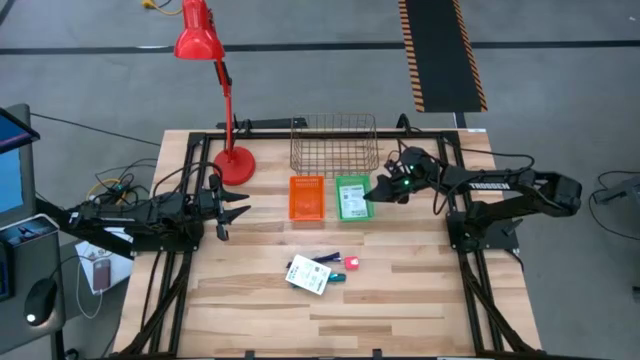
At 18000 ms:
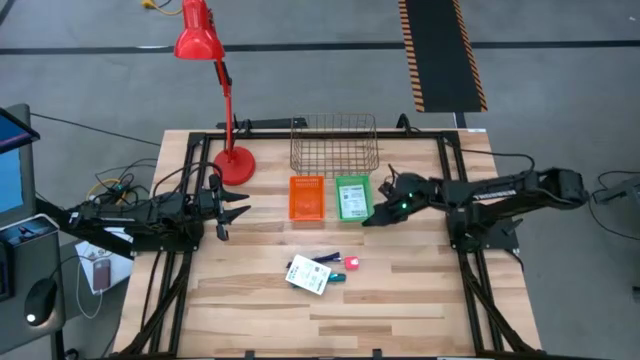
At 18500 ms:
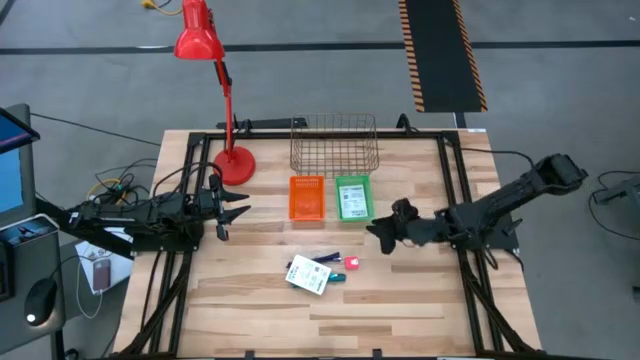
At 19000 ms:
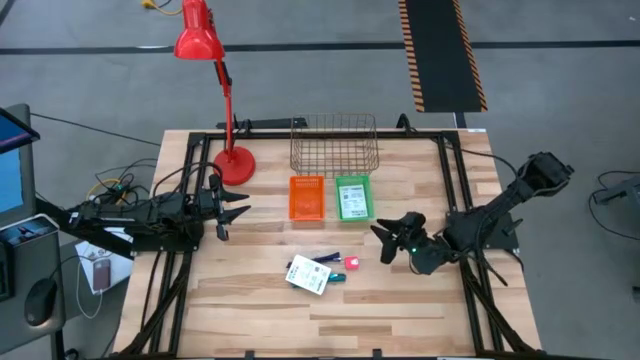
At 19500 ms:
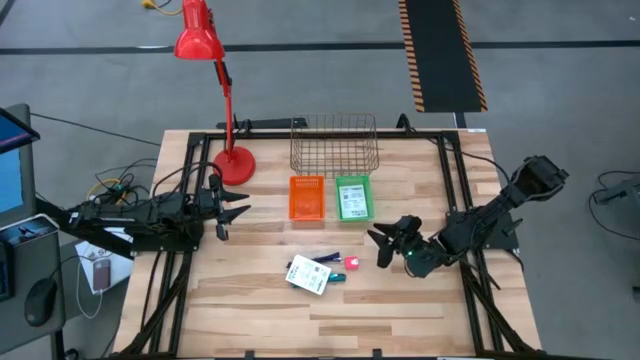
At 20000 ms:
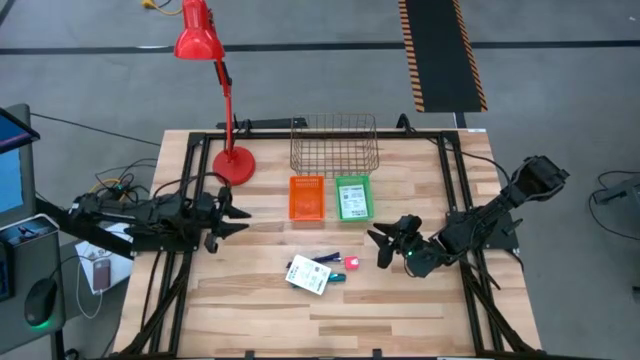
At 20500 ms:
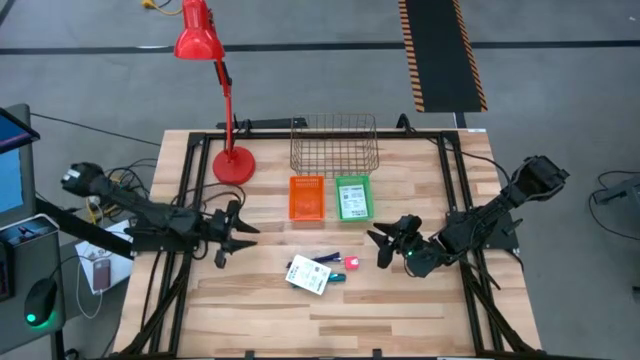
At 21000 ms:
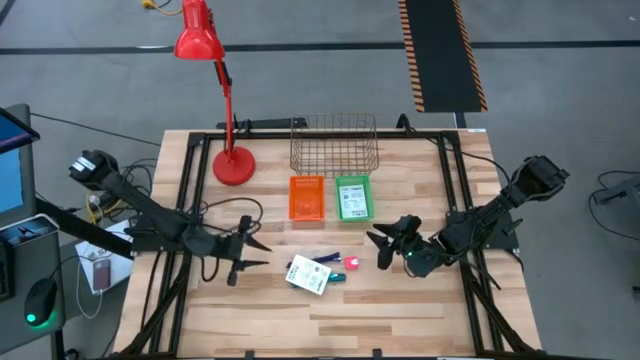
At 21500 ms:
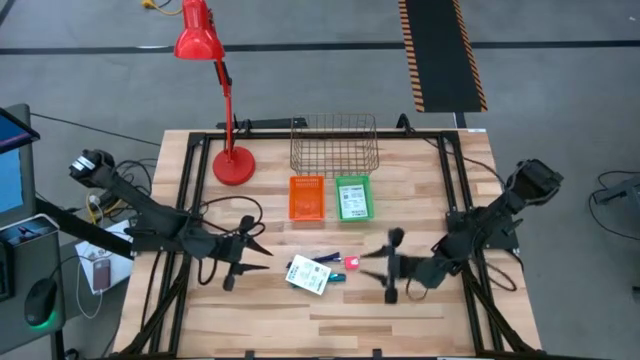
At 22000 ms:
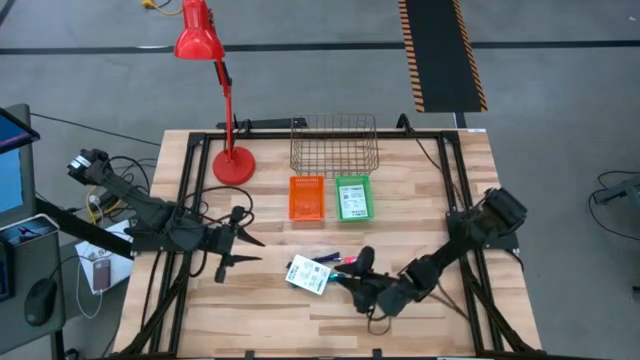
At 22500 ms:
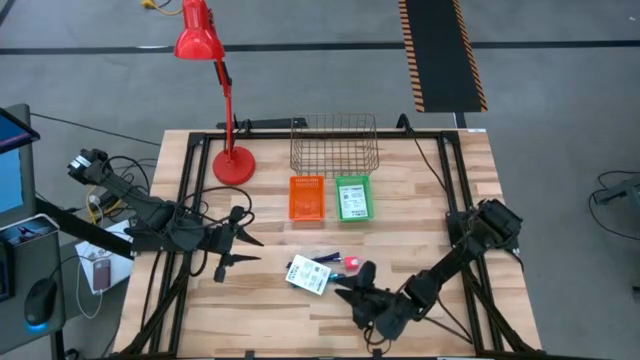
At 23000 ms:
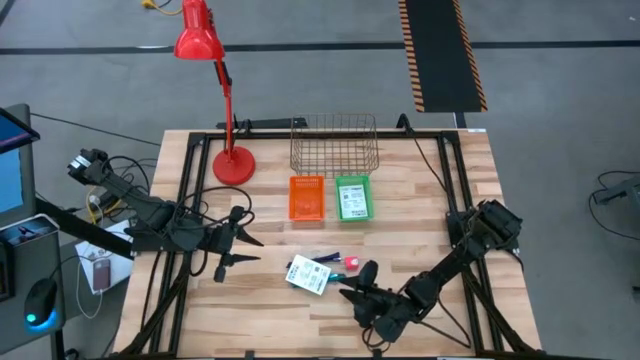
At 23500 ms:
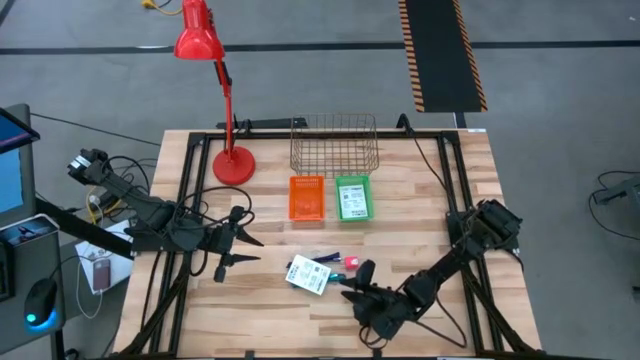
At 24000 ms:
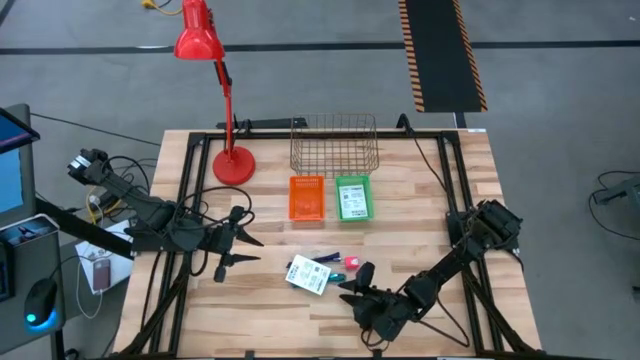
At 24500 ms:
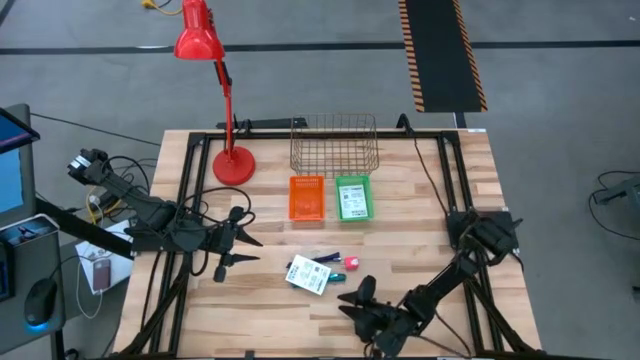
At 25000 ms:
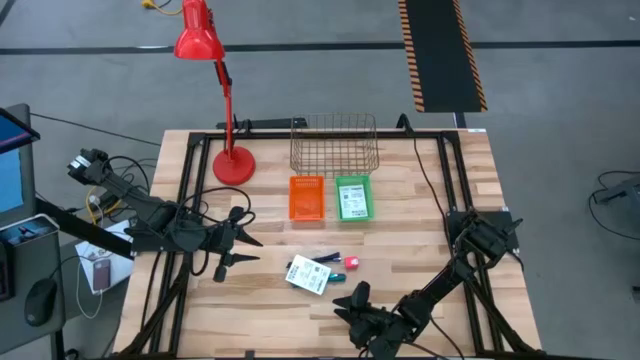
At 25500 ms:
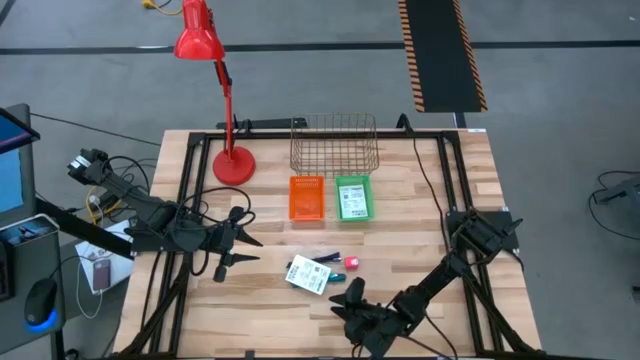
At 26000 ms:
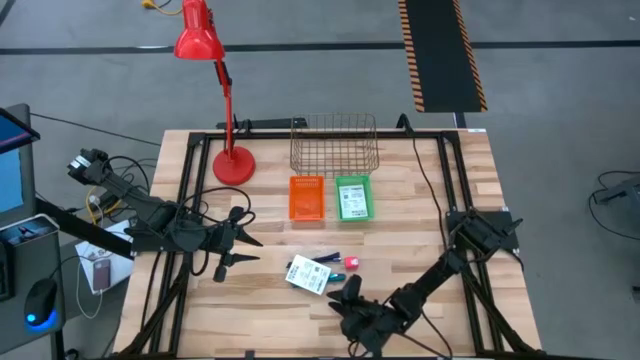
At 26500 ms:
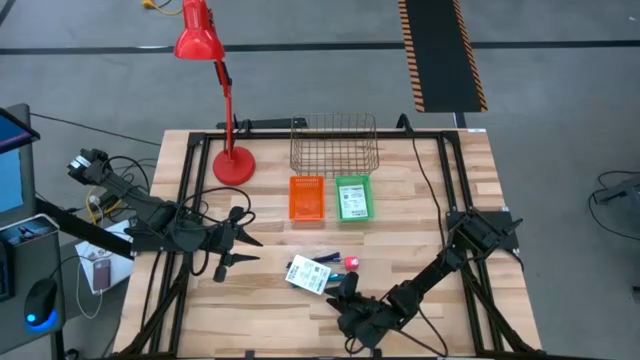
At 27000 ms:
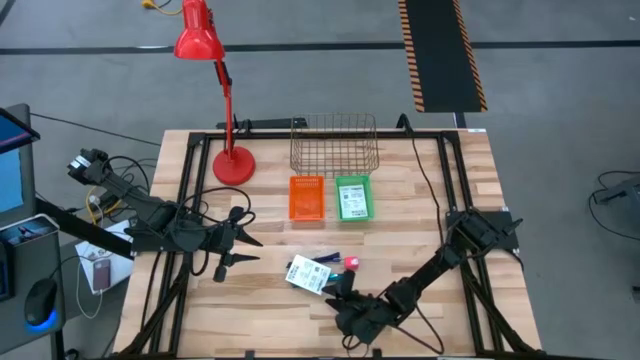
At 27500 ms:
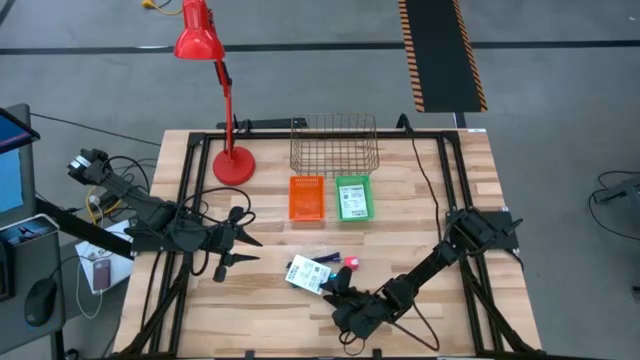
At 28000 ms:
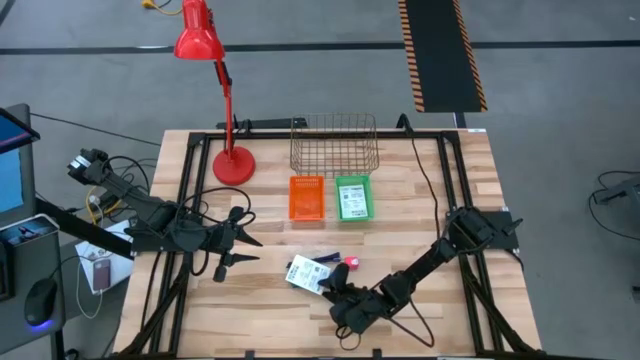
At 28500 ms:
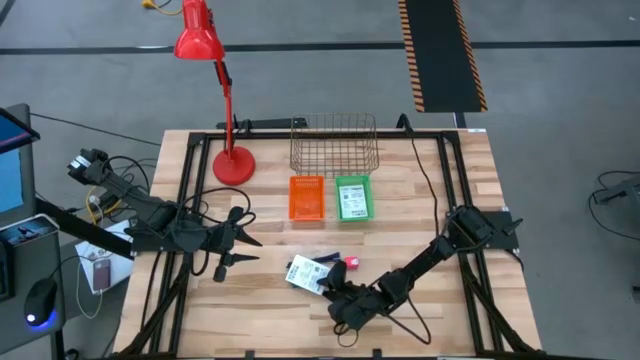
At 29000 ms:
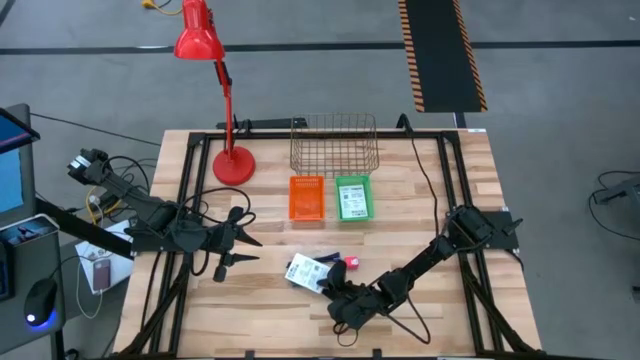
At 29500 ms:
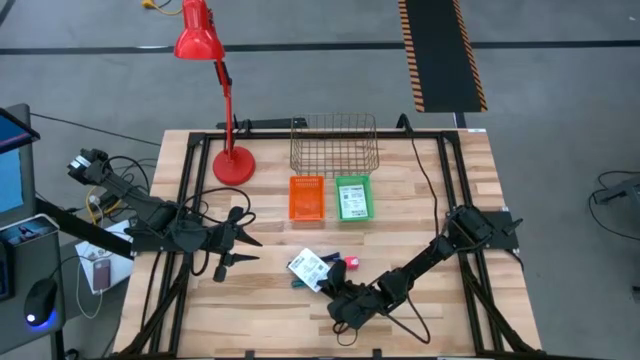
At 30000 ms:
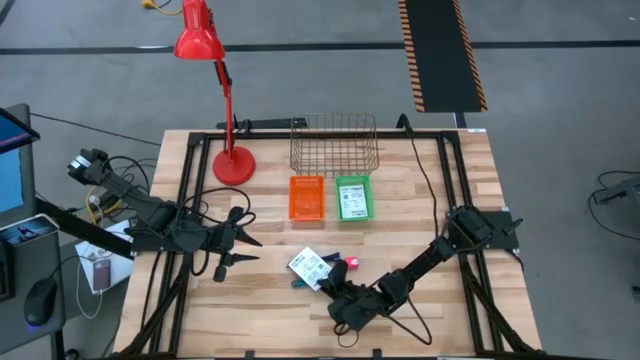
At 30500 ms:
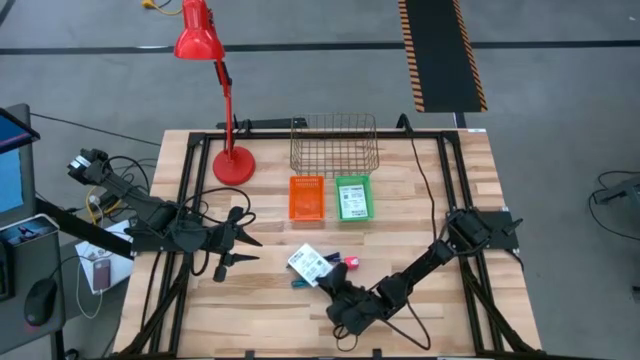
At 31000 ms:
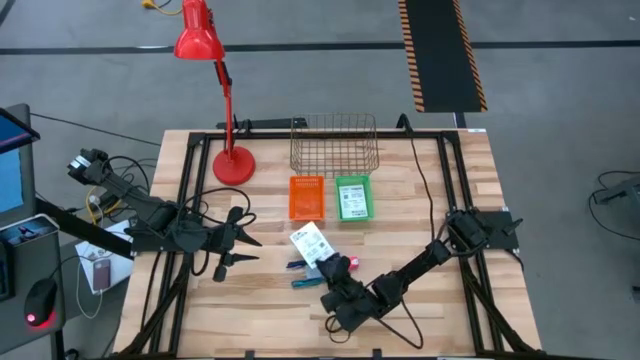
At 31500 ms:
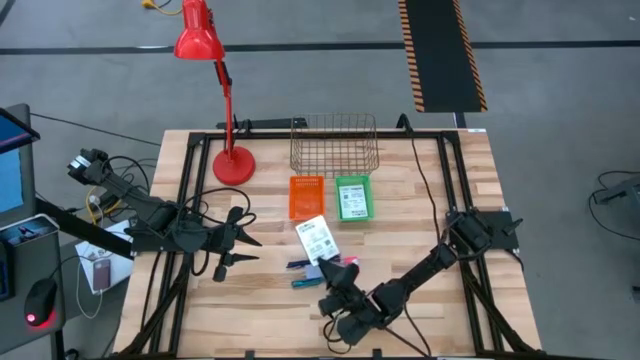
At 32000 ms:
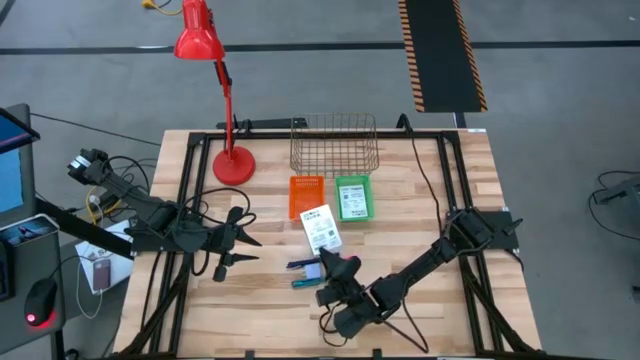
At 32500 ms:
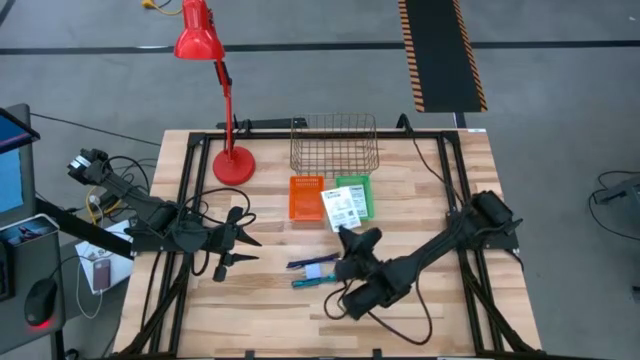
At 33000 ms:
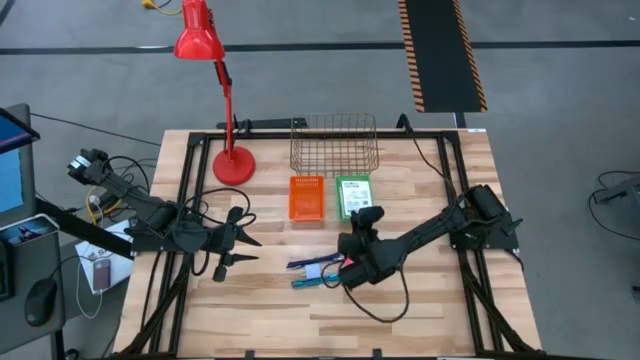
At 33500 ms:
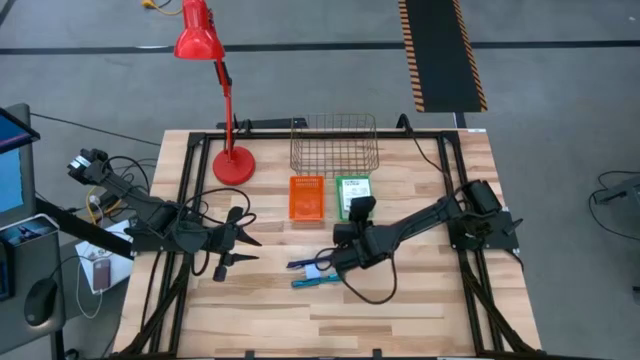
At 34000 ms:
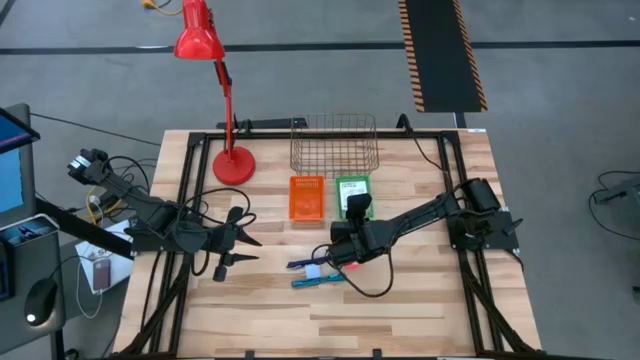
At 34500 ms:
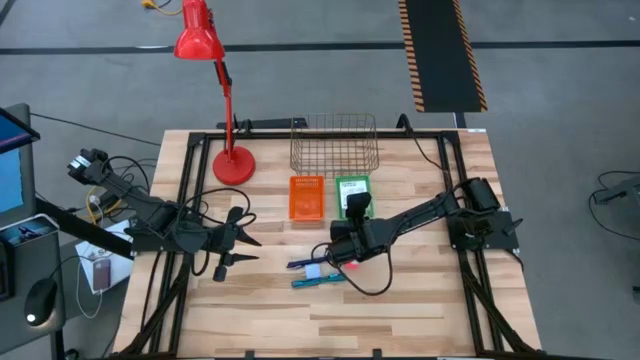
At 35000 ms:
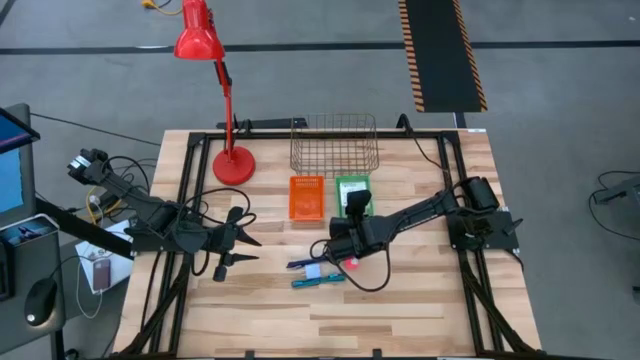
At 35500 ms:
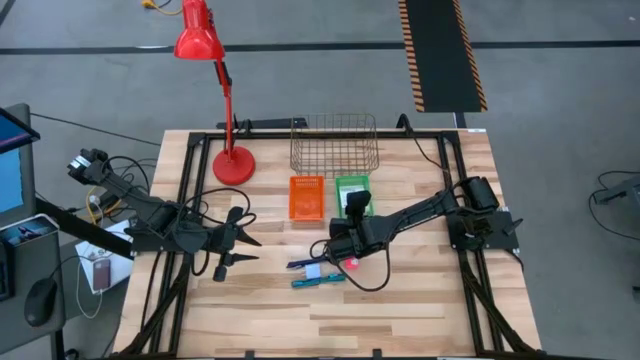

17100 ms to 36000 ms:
Task: Pick and place items into bin
Put the white card reader box into the green bin

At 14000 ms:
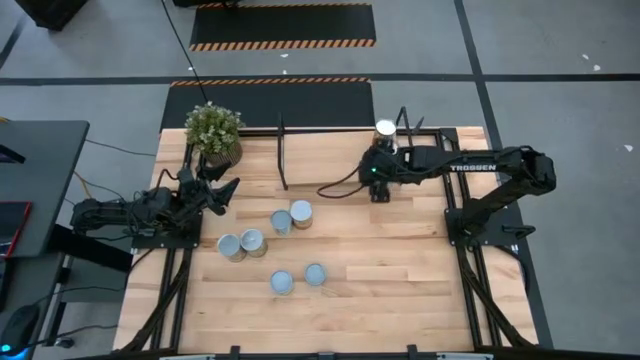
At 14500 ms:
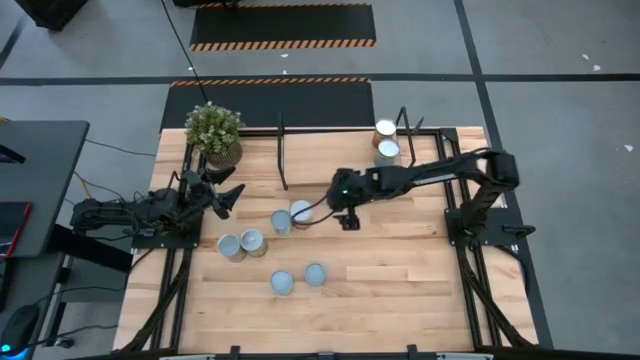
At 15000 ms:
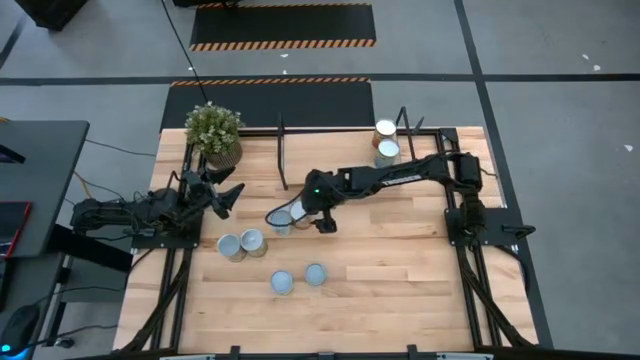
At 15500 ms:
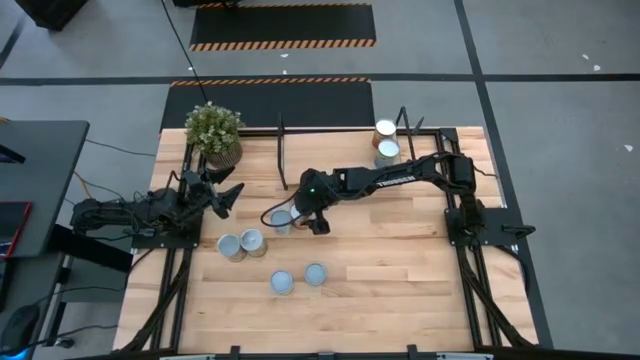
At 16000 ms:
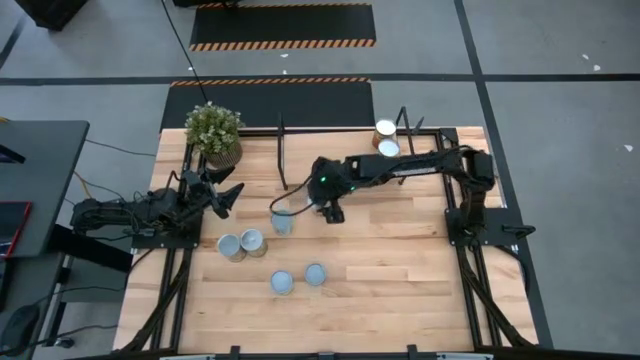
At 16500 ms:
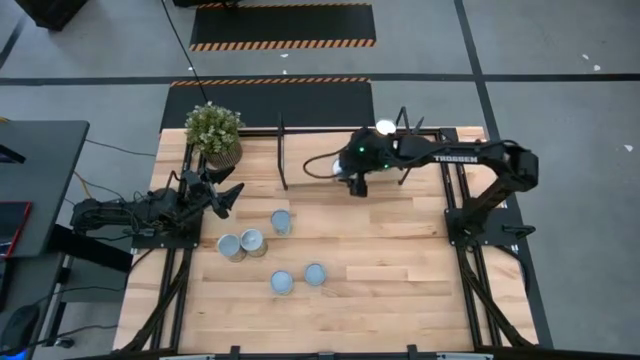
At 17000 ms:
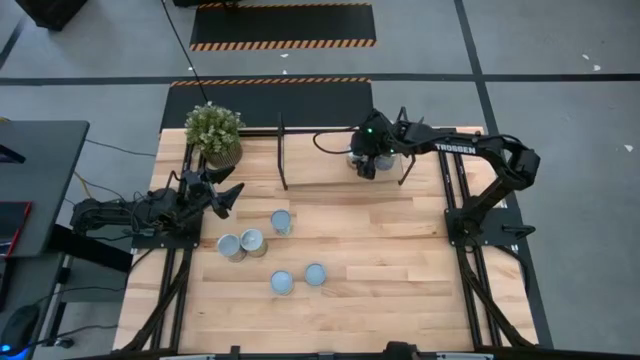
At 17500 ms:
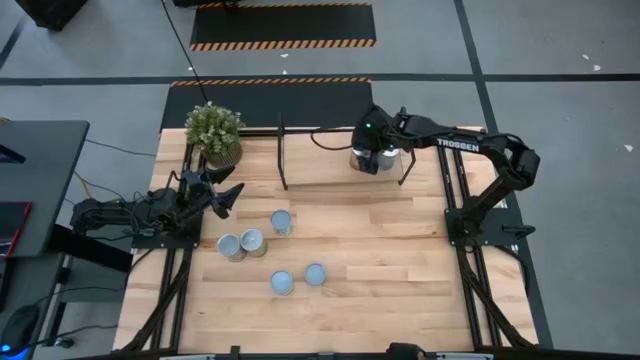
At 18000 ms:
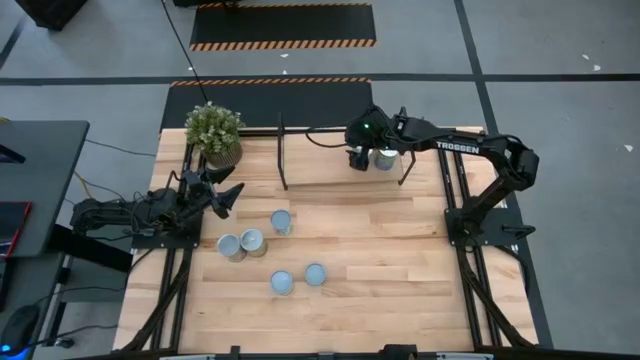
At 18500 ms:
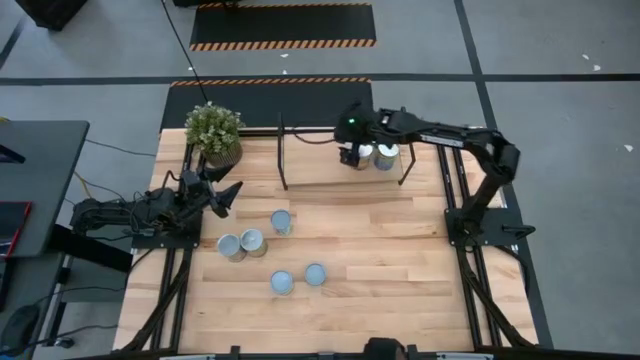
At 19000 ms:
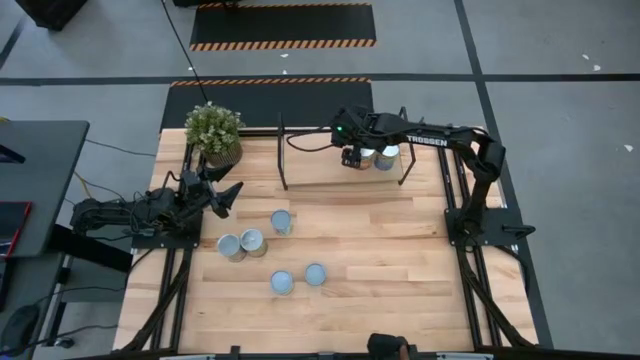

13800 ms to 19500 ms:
Task: Pick and place cans onto a shelf
Put the canned corn on the shelf
